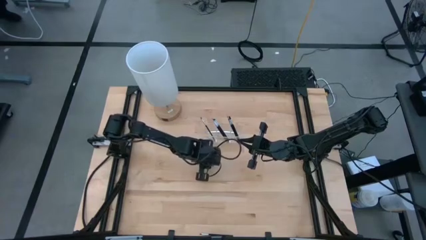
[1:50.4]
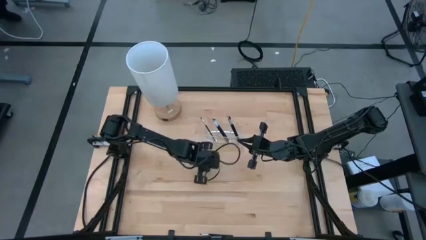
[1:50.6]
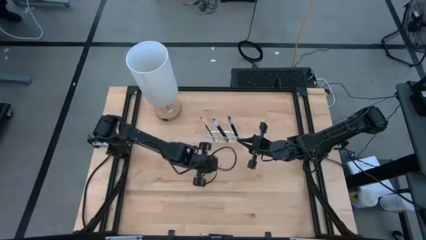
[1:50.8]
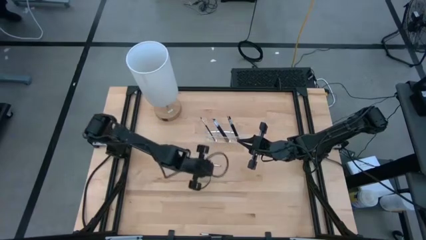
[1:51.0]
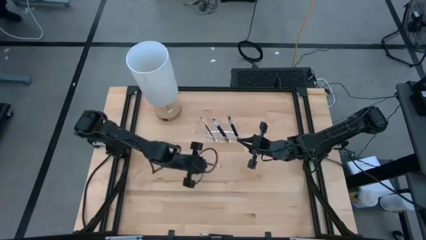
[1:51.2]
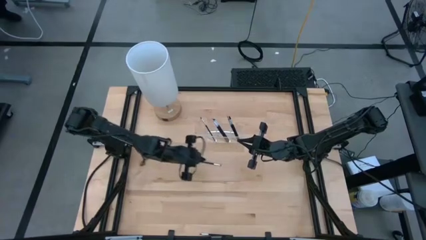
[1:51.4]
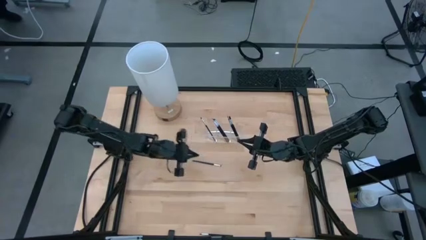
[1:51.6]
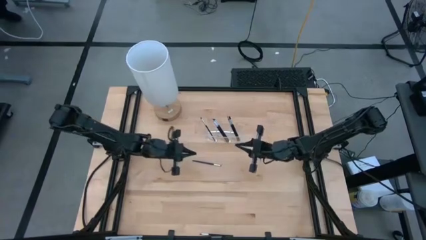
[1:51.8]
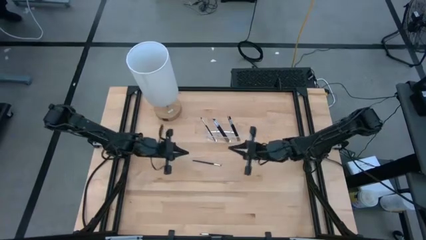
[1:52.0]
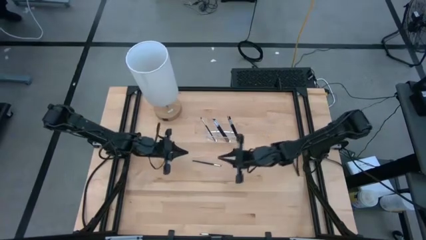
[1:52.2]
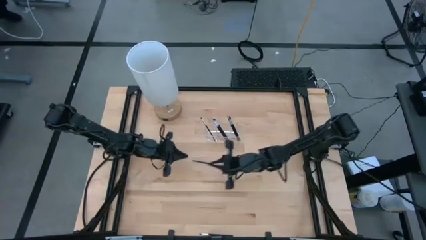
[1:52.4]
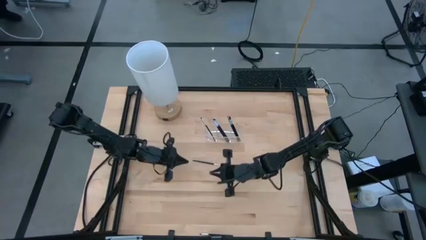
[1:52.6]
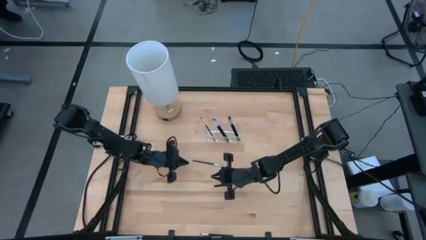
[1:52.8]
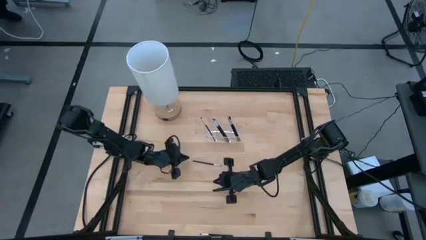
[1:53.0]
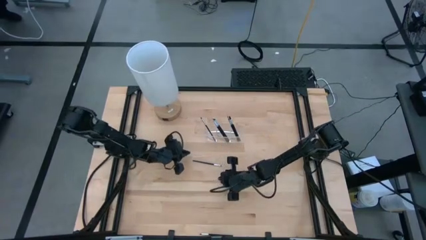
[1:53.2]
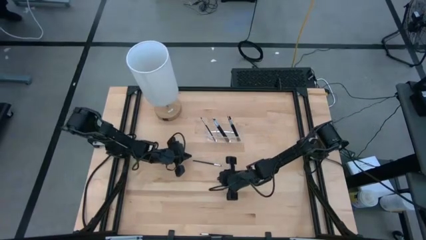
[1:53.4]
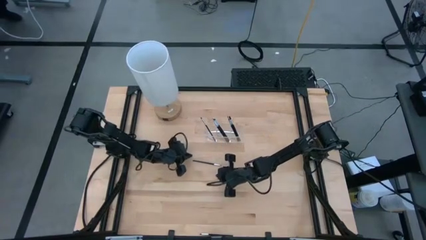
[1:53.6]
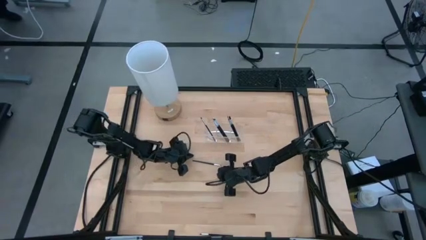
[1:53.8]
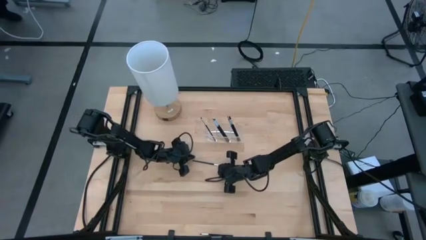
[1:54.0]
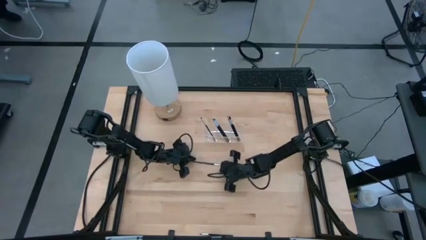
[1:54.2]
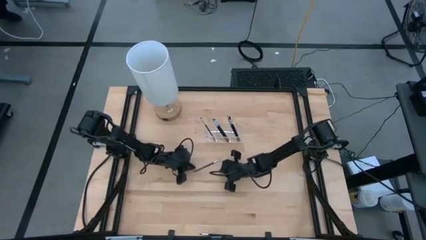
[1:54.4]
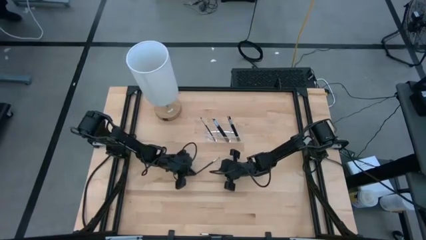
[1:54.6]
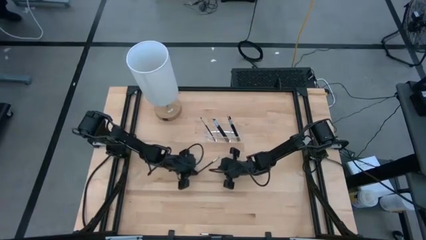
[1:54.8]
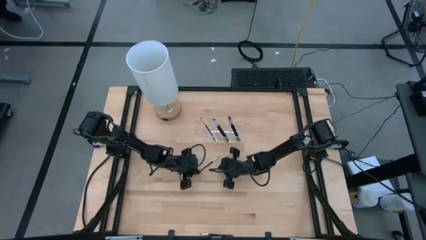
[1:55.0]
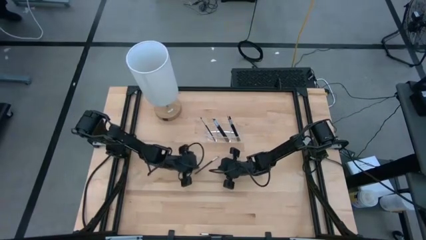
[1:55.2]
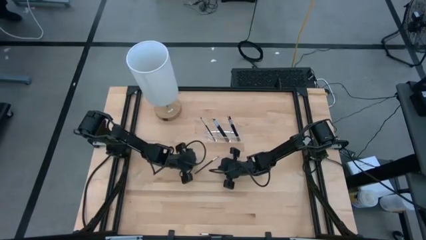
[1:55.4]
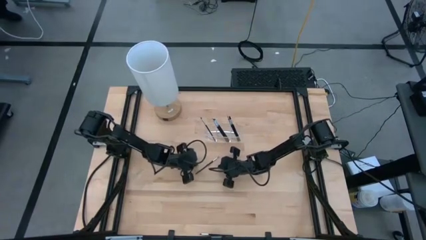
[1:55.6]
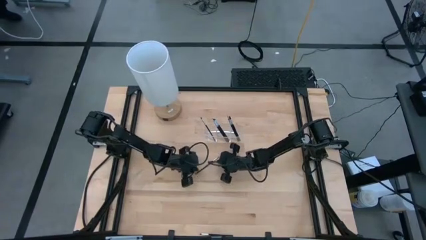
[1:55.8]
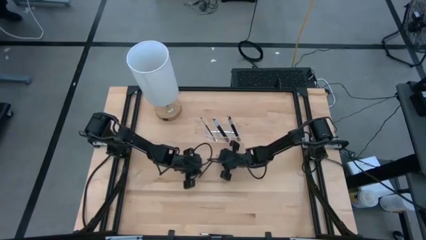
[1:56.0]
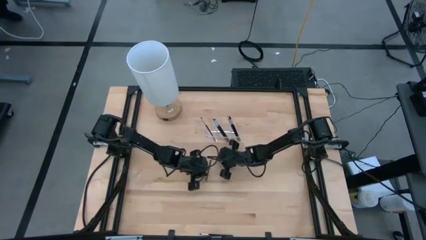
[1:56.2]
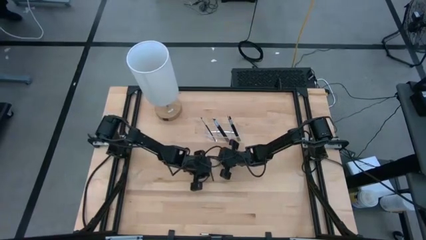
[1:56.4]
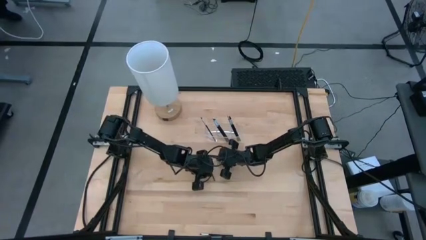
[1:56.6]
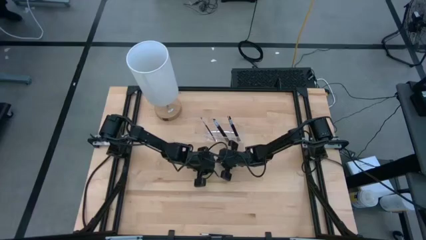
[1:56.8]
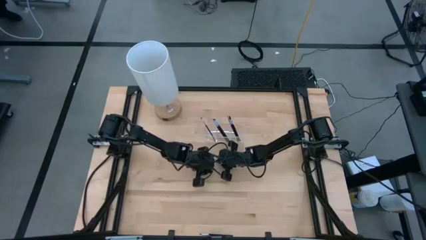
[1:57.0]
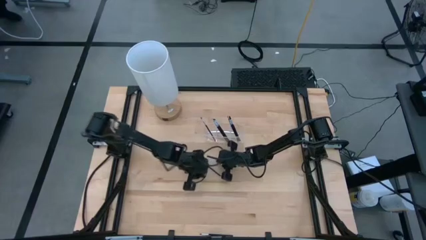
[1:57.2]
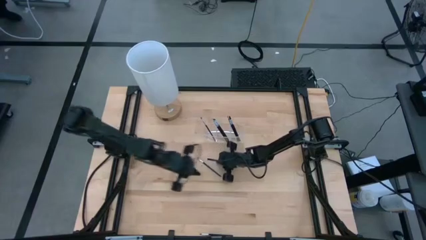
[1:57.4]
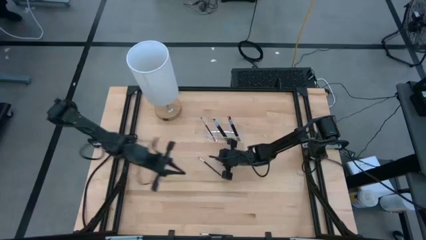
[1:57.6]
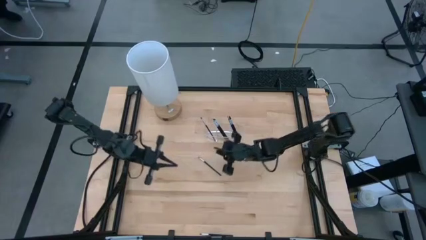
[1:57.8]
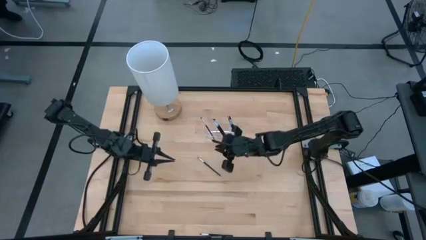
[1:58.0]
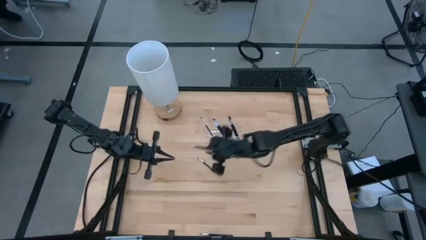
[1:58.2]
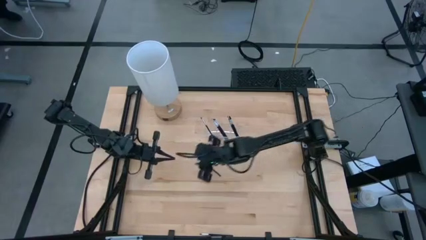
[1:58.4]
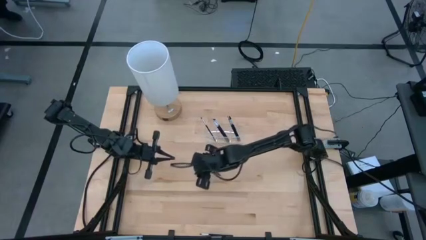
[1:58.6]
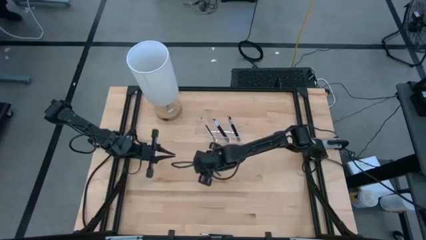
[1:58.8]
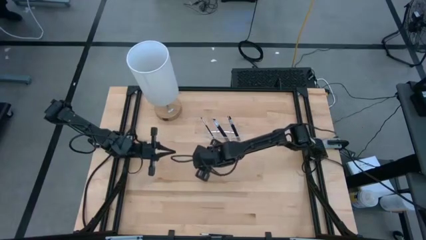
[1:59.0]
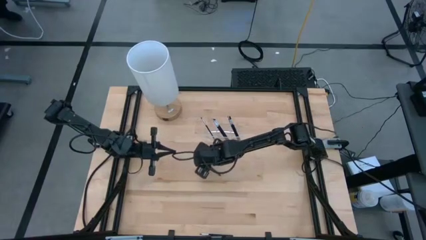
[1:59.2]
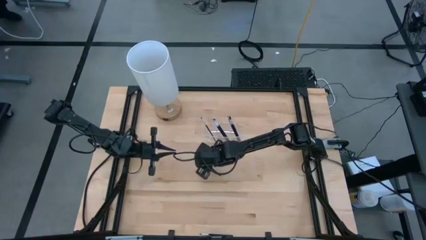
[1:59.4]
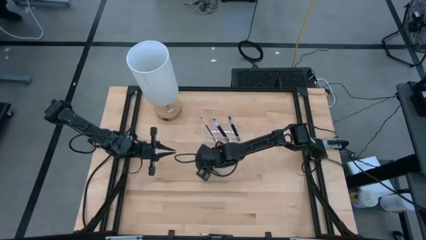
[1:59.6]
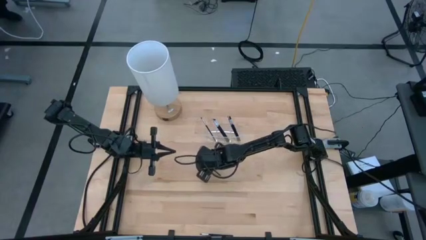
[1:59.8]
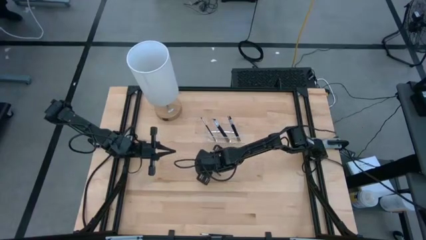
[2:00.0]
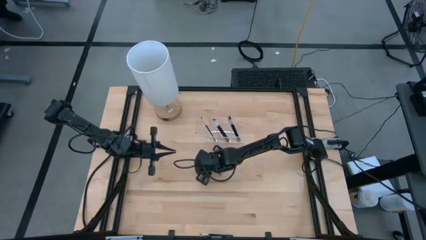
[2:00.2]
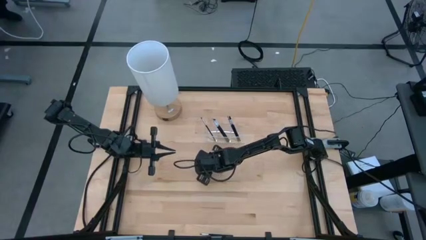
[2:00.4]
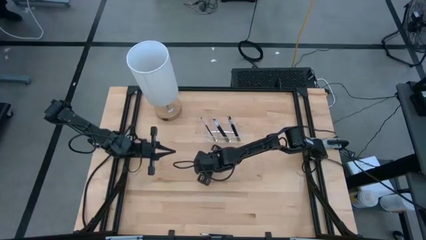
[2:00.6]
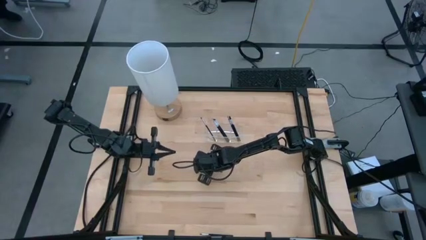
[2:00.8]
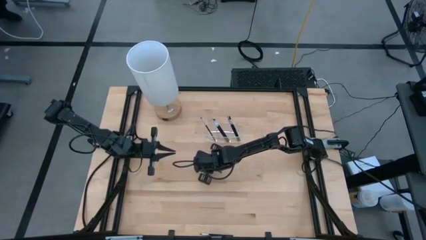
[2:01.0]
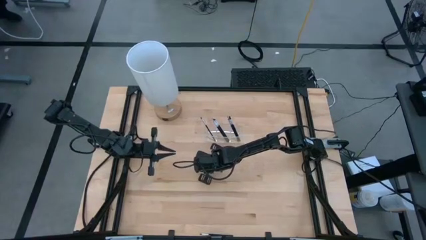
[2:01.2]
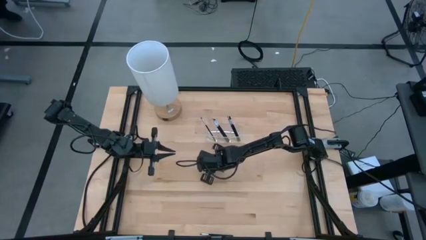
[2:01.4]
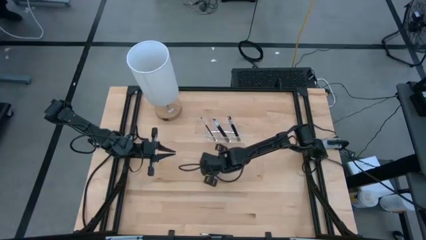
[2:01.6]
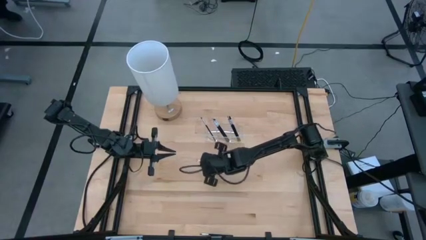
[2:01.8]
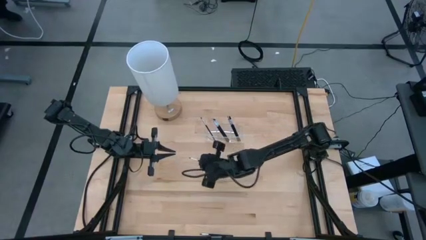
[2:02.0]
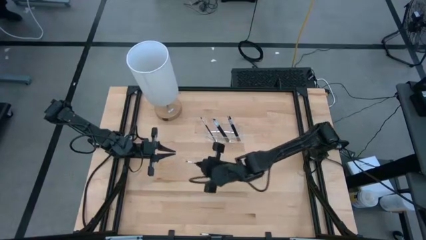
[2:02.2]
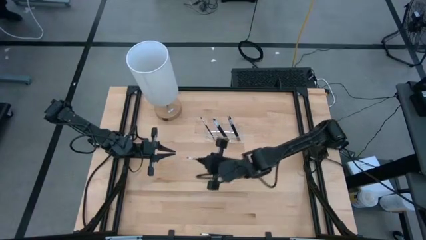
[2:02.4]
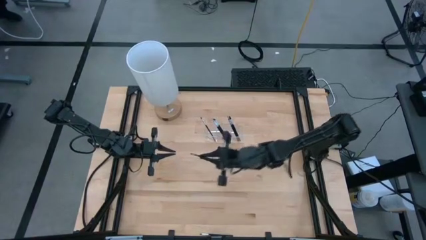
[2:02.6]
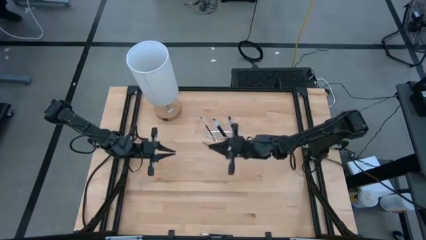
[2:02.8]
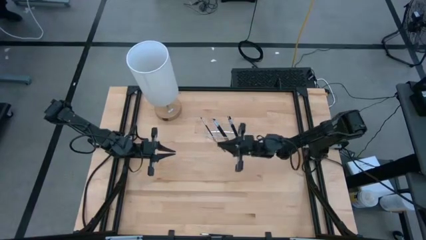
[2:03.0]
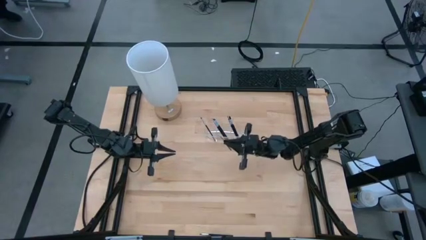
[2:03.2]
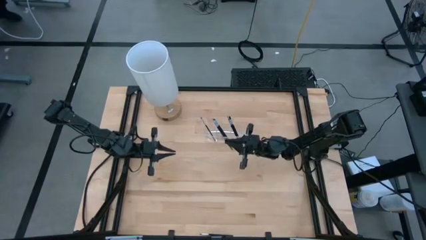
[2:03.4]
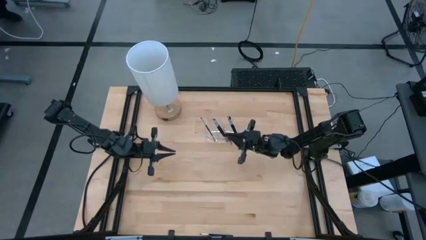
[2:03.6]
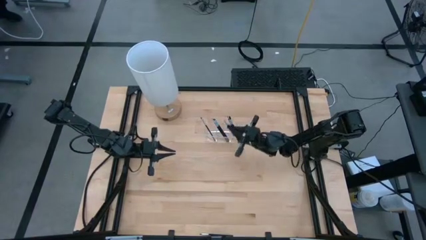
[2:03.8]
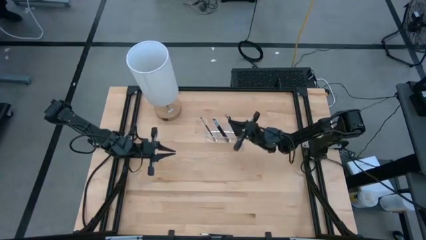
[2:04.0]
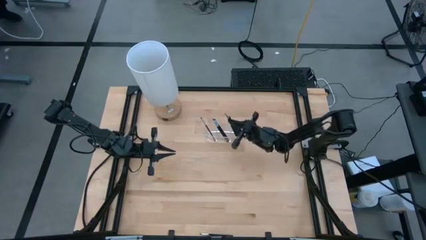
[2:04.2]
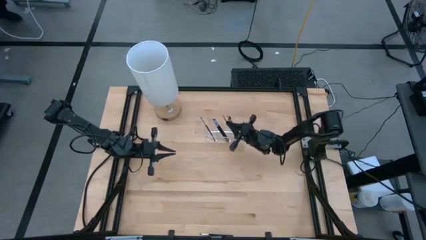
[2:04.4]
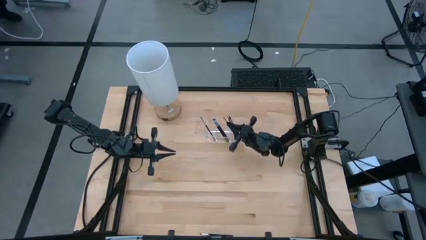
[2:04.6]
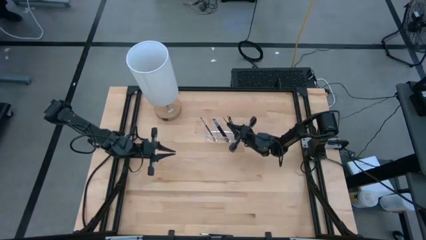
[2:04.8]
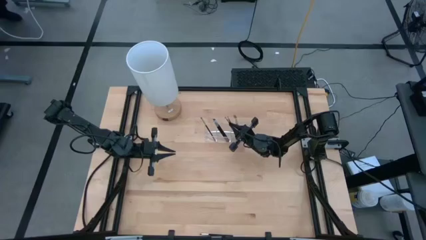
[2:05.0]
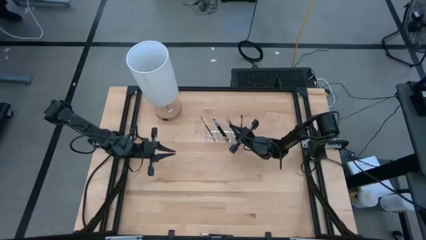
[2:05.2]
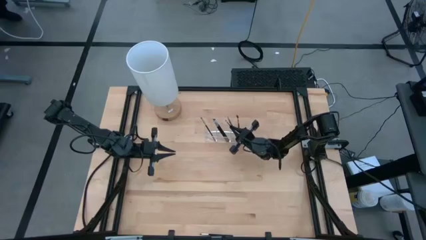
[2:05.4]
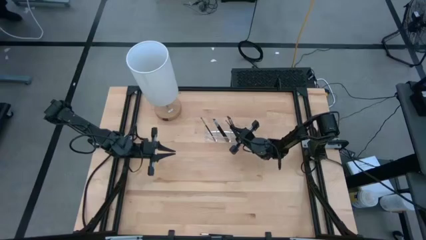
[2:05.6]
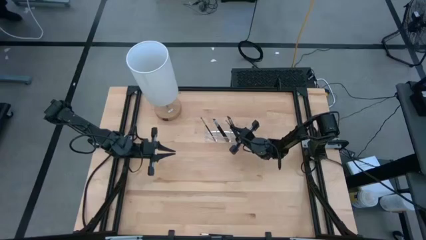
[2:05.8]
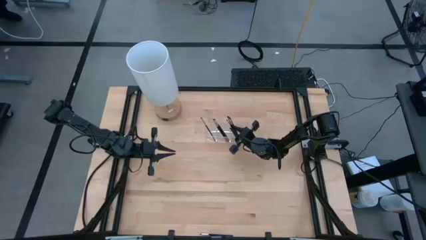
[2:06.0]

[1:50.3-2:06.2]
Task: Put items in baskets/containers
Put the black eyeshadow brush into the transparent organizer
